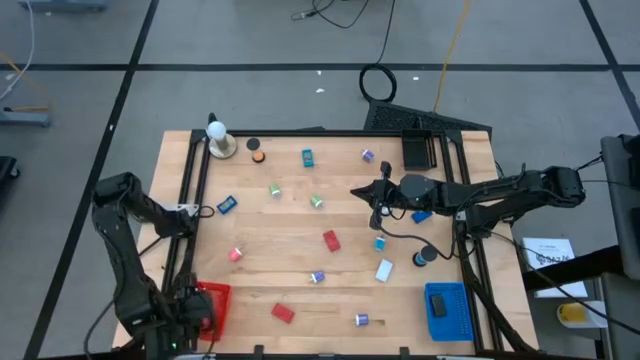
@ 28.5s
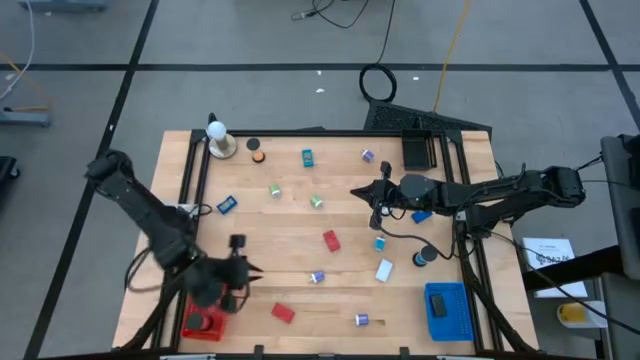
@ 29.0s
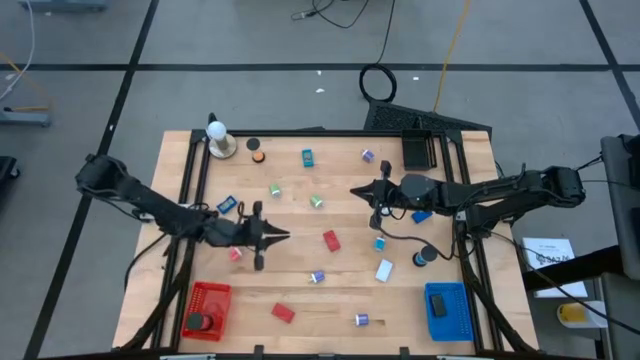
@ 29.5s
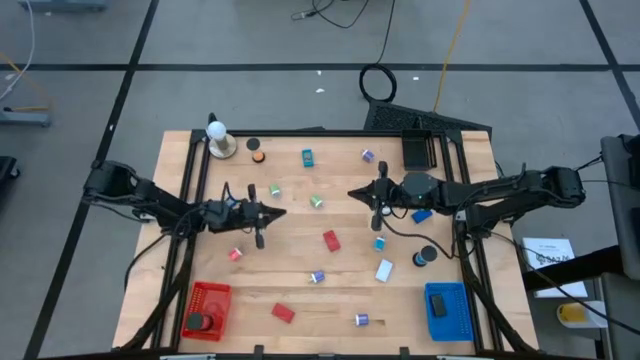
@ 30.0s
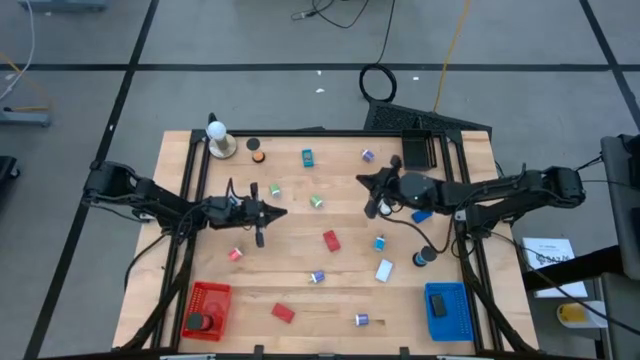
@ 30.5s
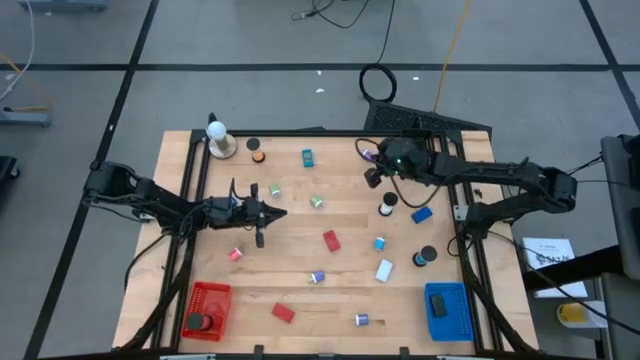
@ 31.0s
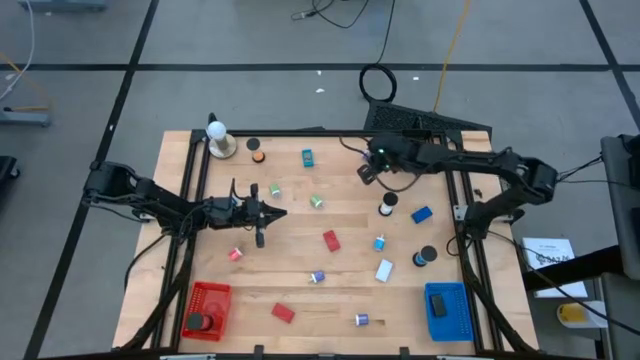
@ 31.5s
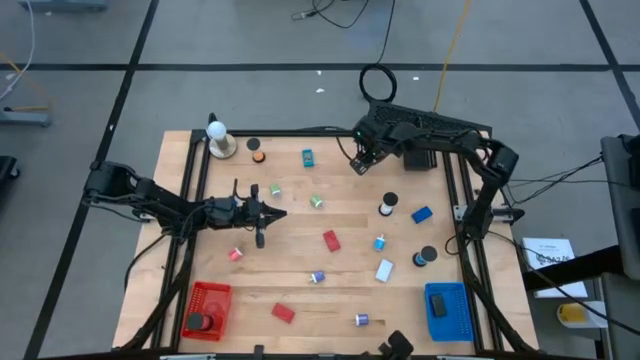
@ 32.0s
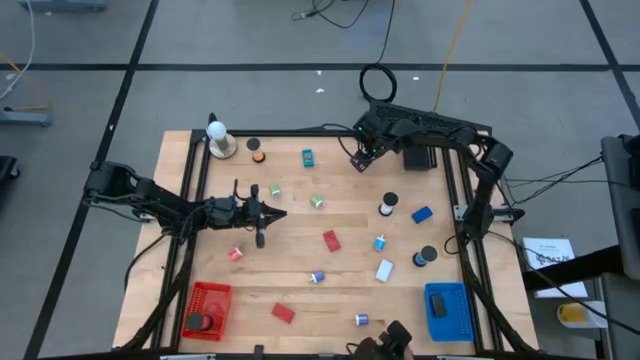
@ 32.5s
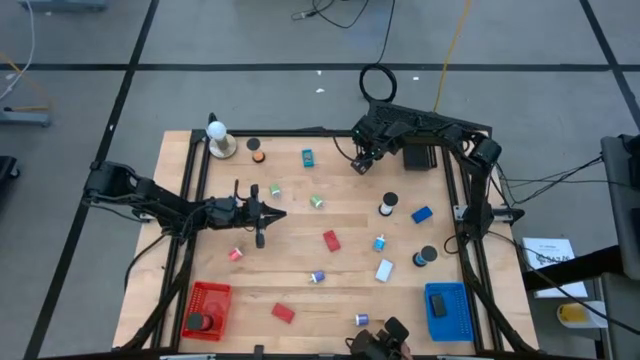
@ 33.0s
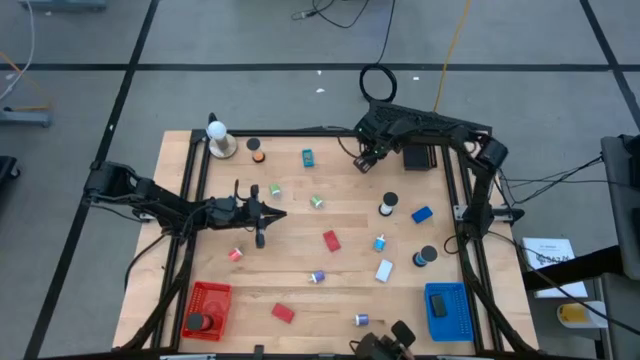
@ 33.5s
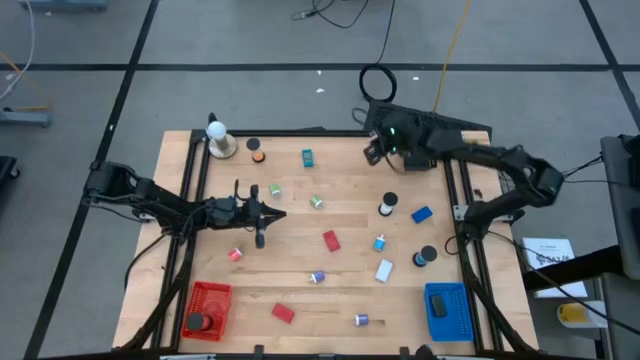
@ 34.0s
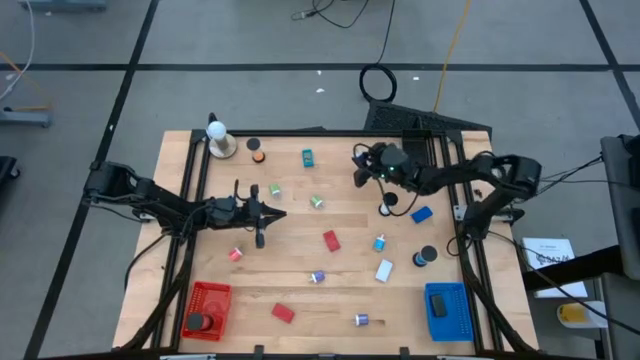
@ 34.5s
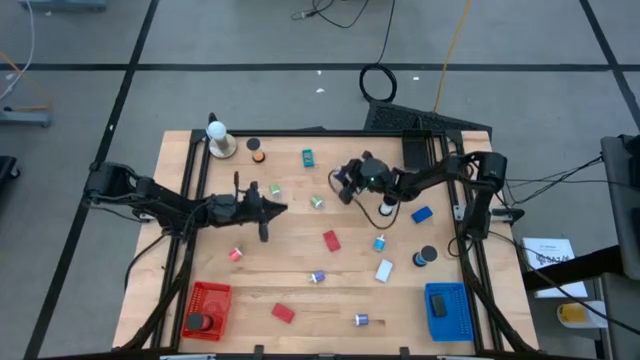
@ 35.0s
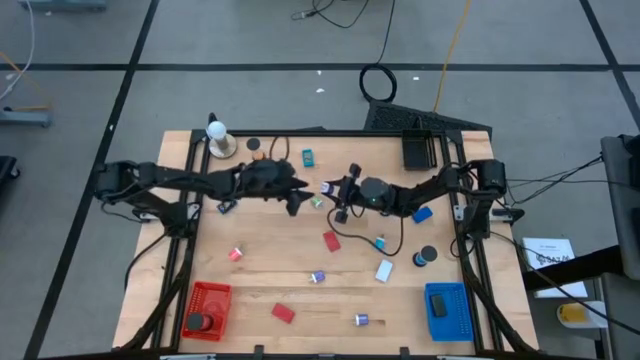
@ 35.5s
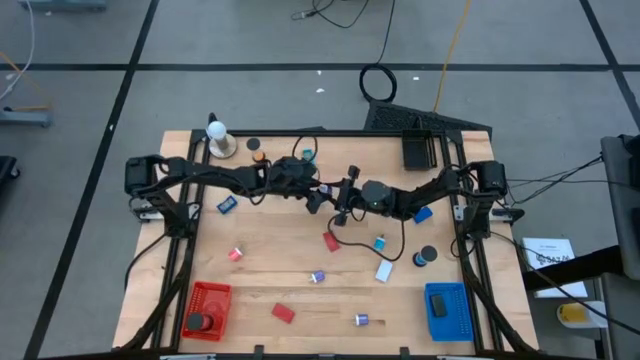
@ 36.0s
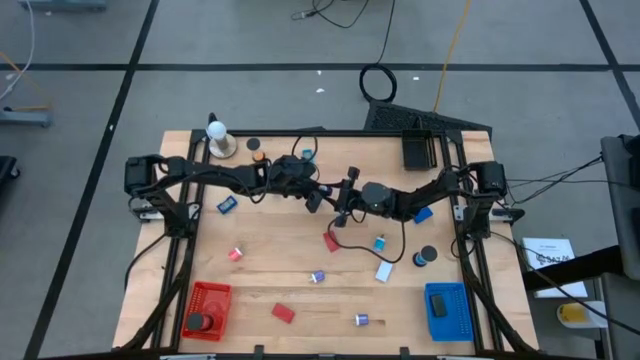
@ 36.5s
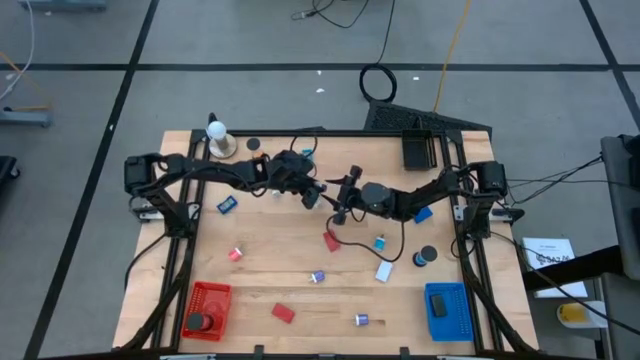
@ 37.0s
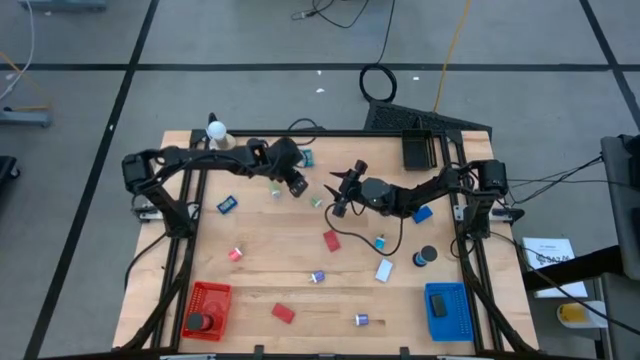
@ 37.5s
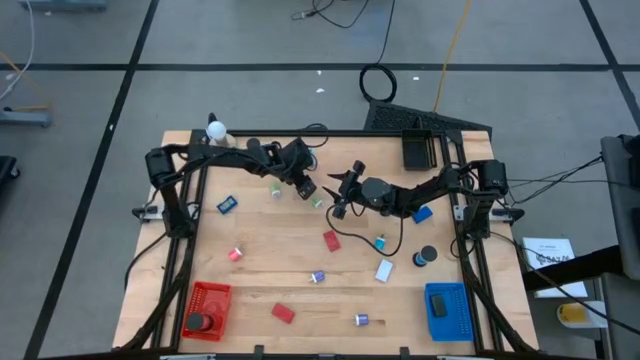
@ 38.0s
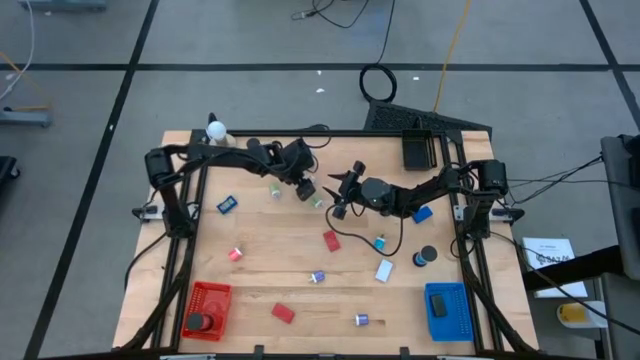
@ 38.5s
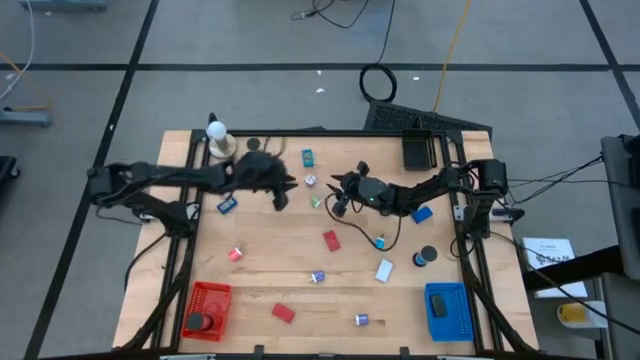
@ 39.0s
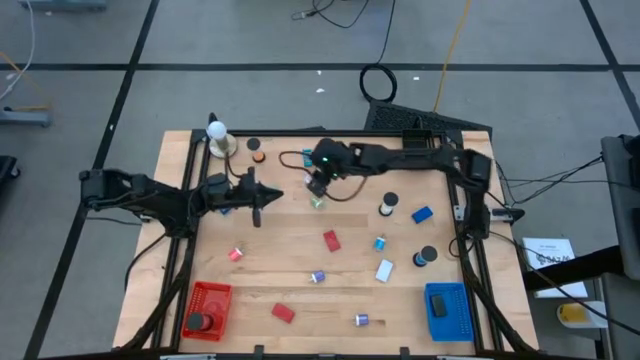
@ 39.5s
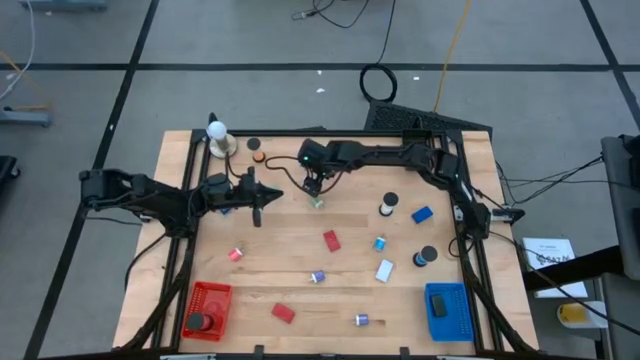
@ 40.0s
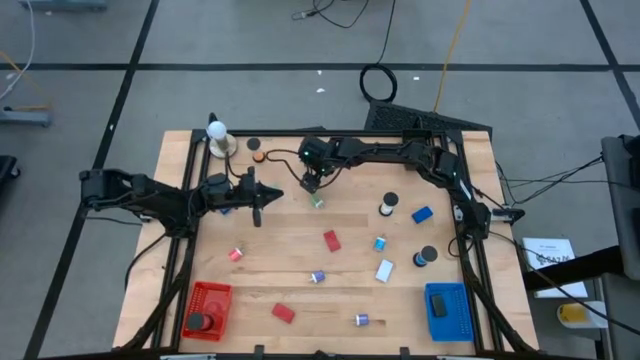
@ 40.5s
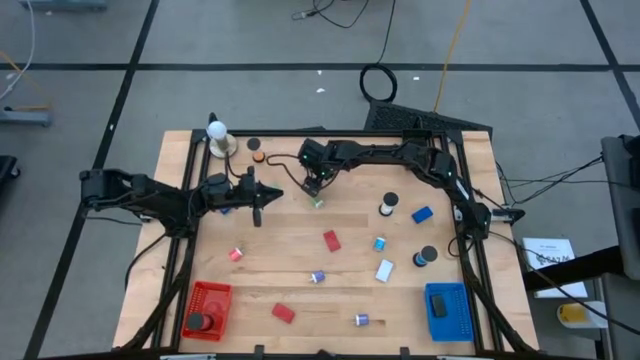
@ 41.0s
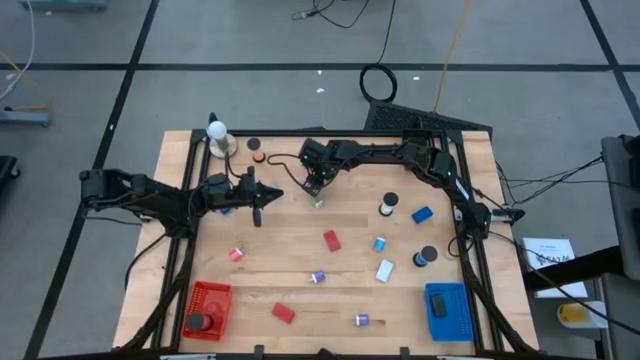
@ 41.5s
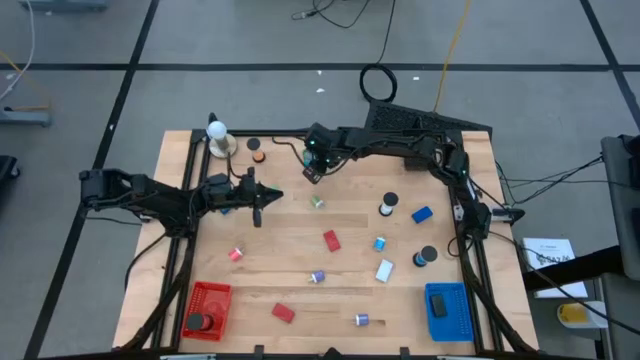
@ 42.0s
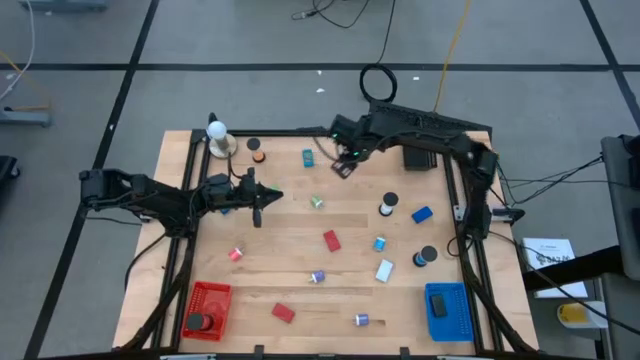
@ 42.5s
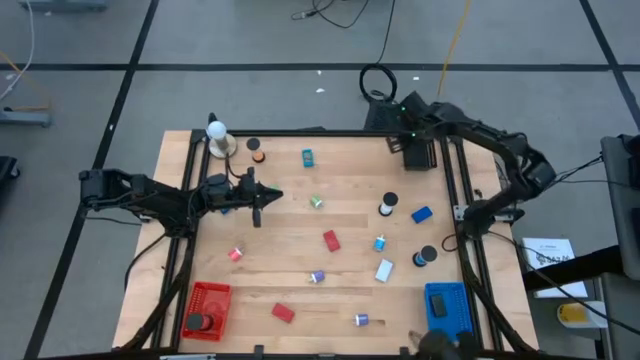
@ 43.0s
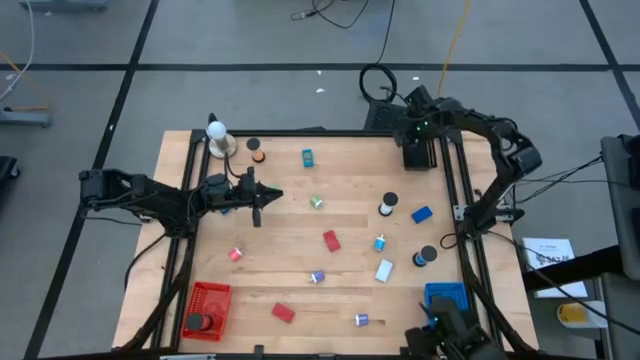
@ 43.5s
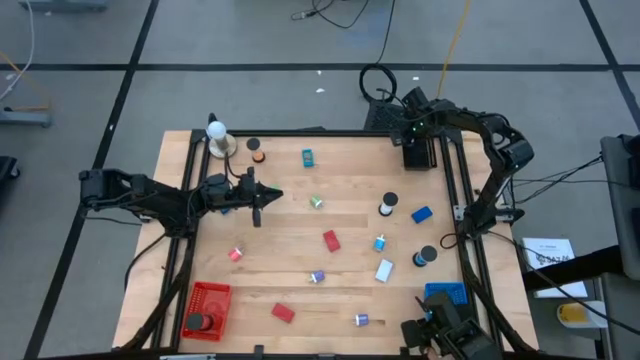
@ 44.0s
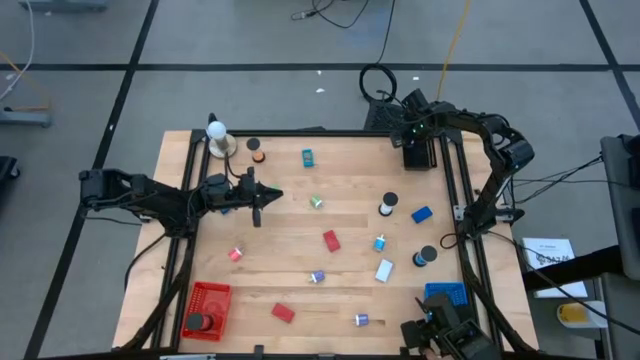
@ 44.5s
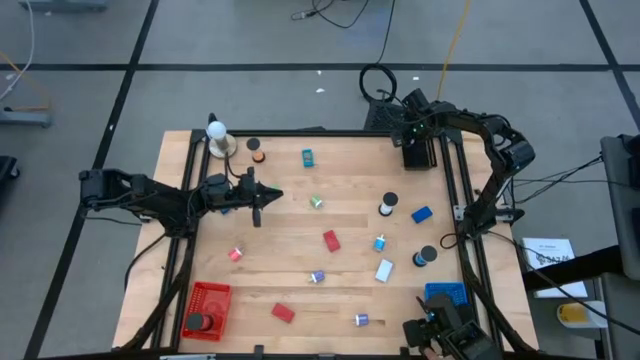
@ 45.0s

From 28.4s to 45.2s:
Task: Pick & Place Office items
Put the violet charger adapter into the black bin
